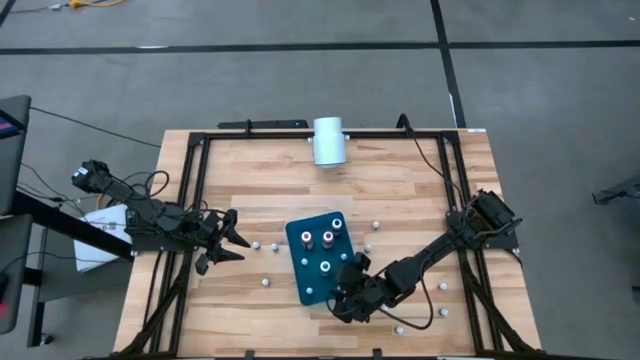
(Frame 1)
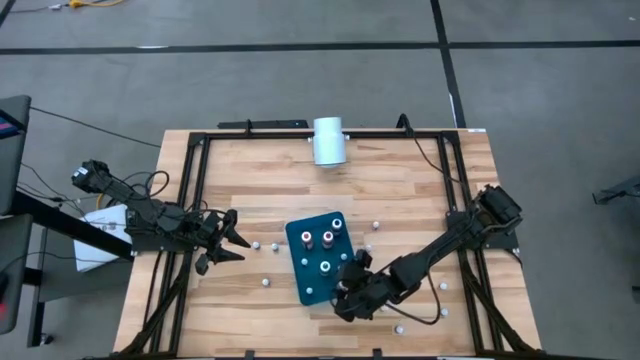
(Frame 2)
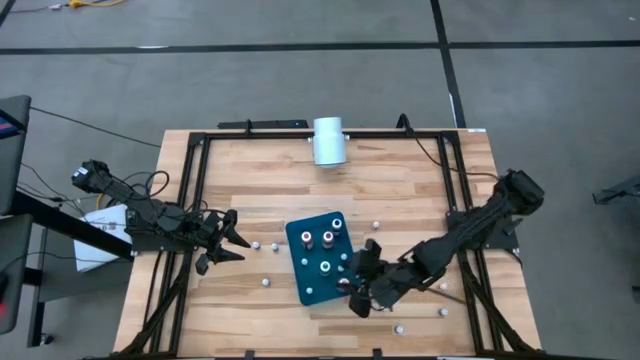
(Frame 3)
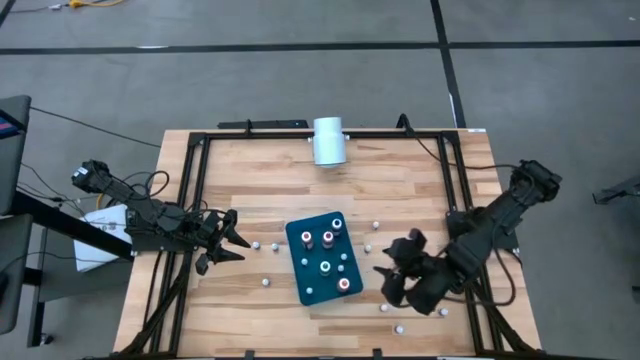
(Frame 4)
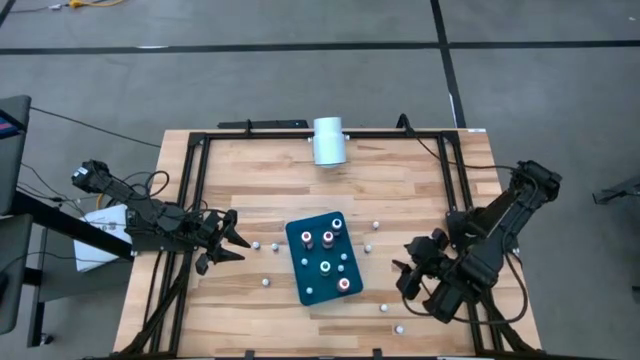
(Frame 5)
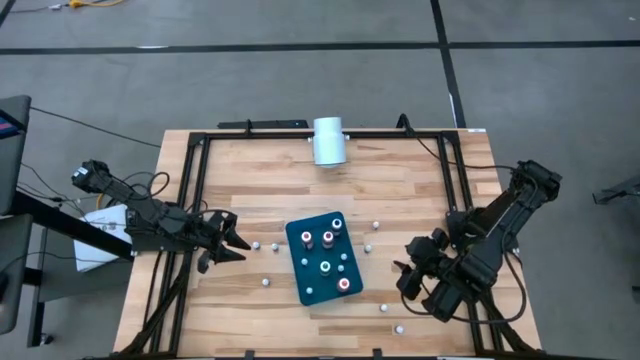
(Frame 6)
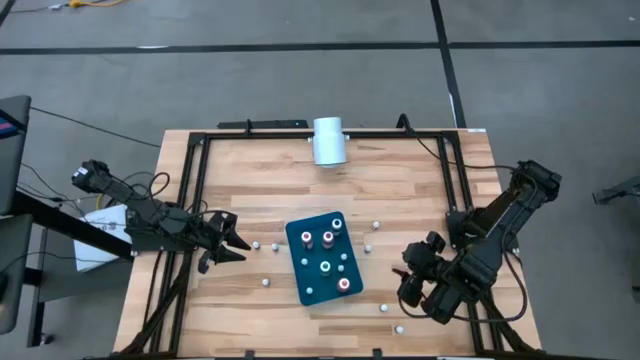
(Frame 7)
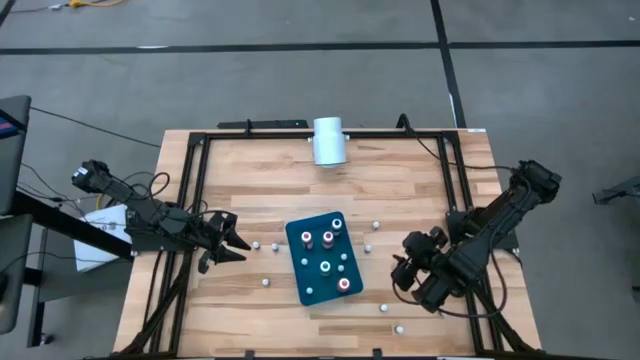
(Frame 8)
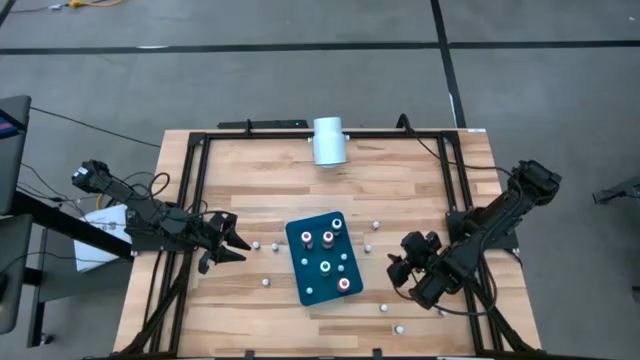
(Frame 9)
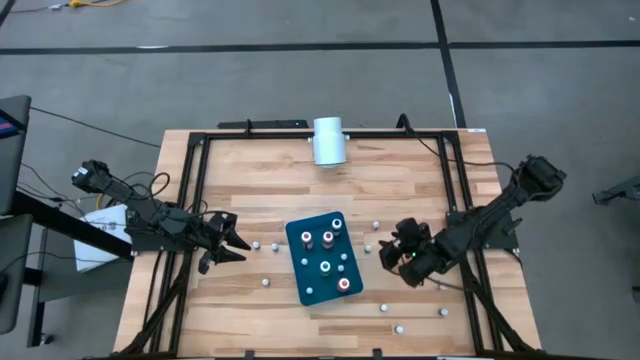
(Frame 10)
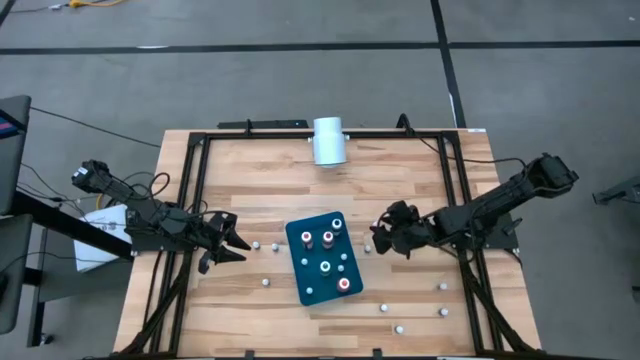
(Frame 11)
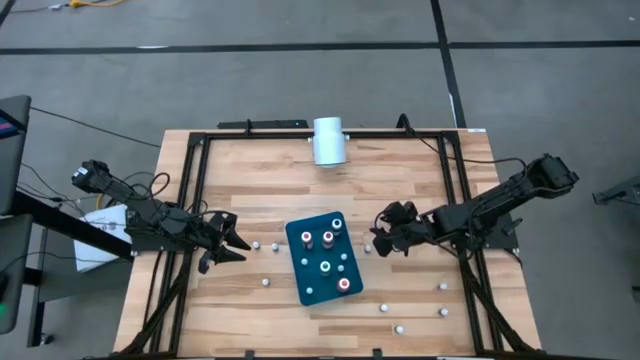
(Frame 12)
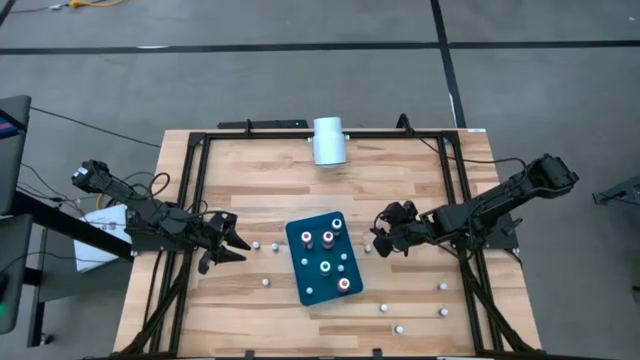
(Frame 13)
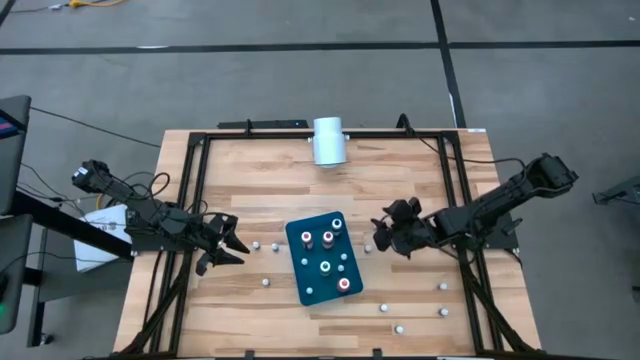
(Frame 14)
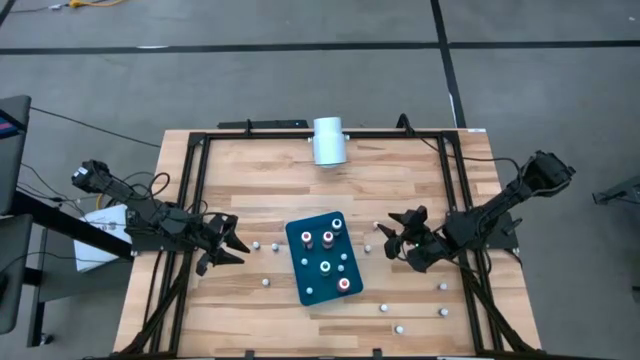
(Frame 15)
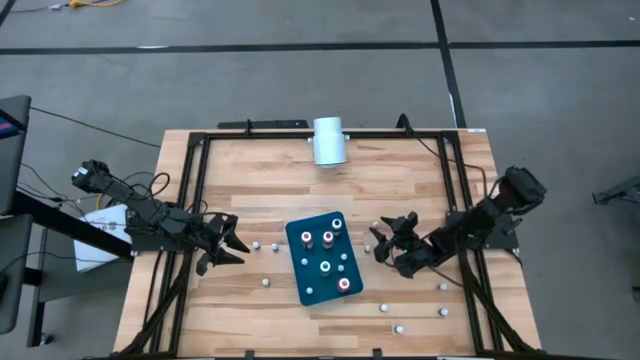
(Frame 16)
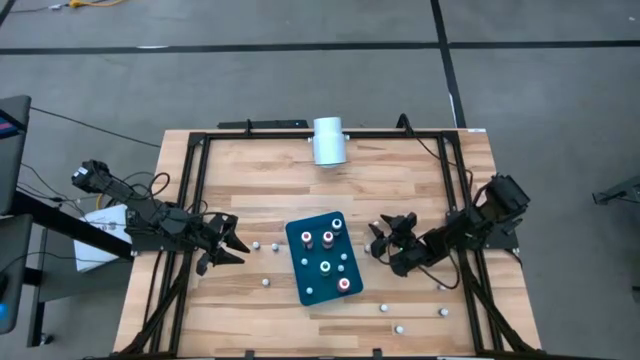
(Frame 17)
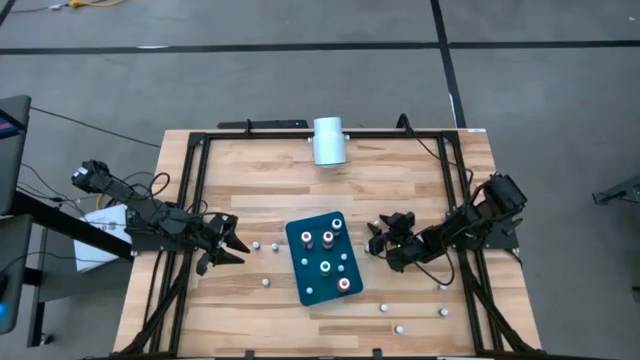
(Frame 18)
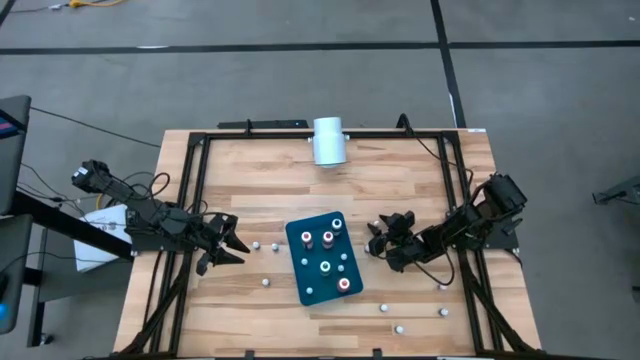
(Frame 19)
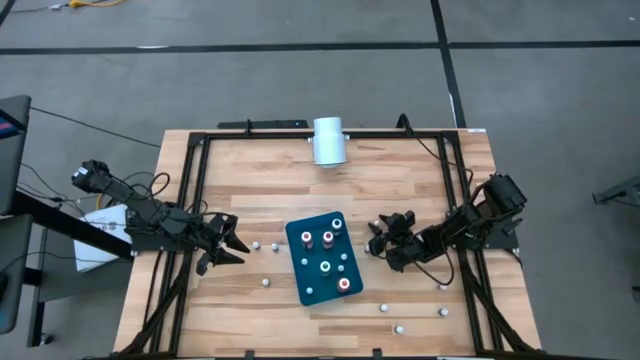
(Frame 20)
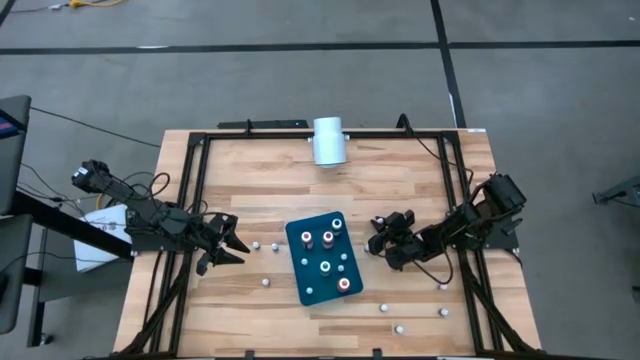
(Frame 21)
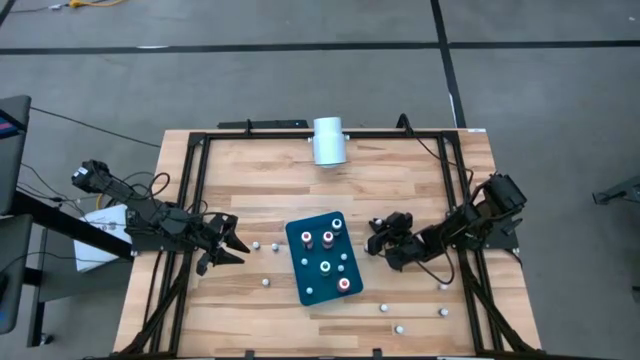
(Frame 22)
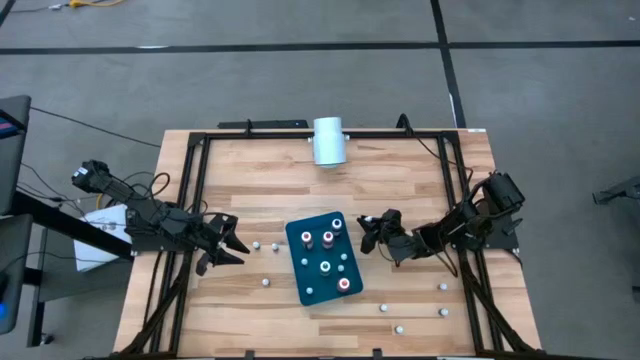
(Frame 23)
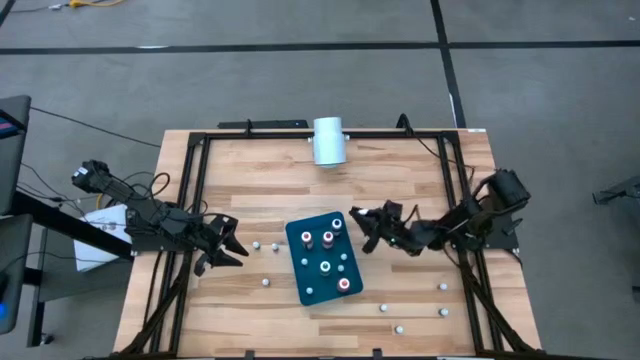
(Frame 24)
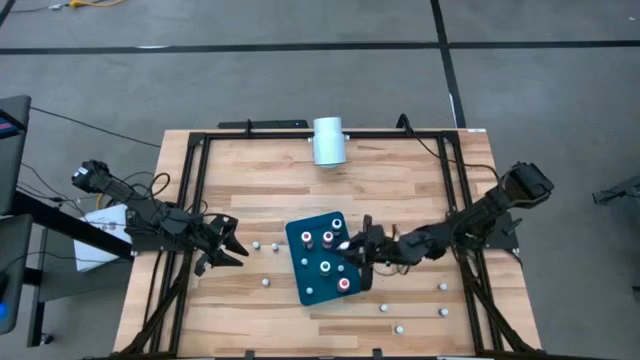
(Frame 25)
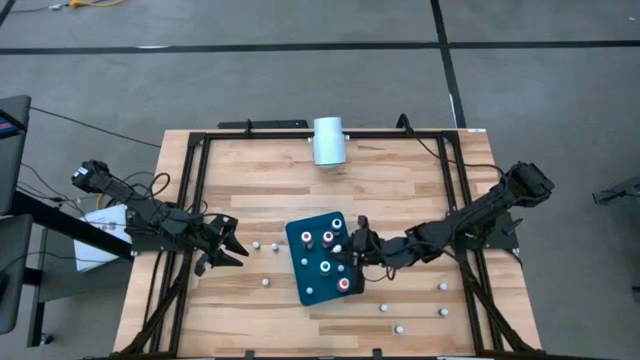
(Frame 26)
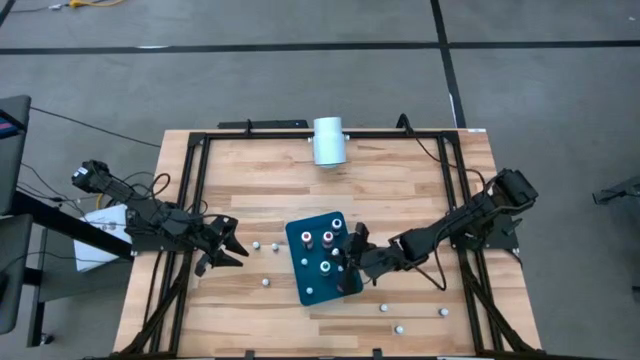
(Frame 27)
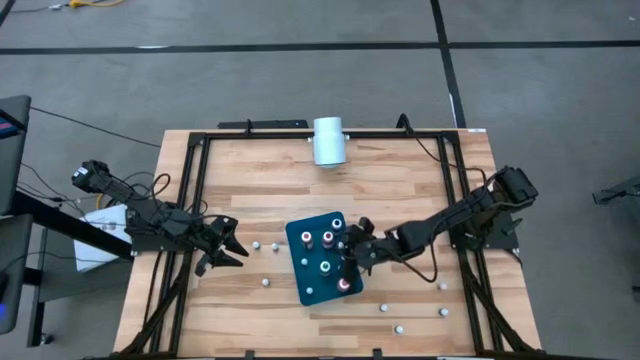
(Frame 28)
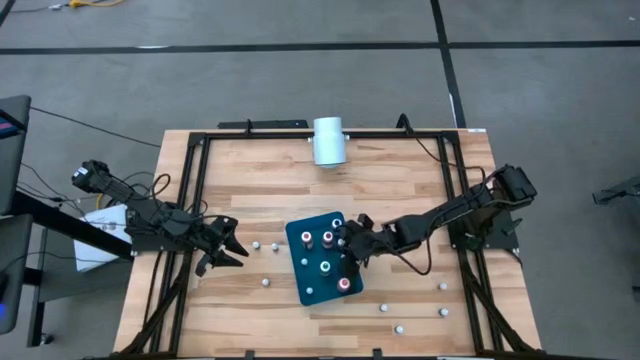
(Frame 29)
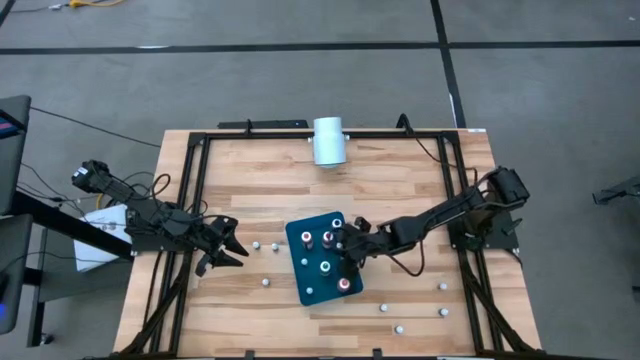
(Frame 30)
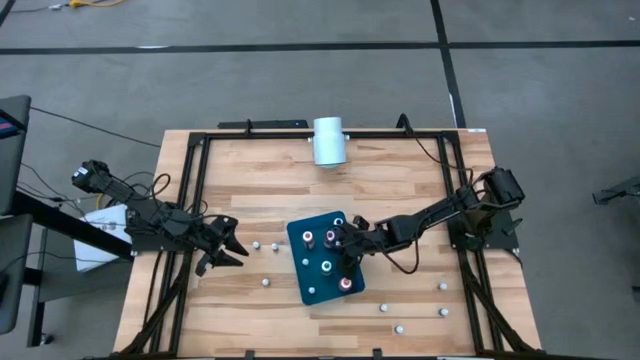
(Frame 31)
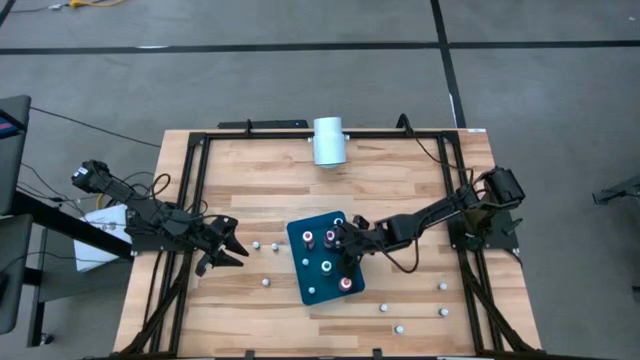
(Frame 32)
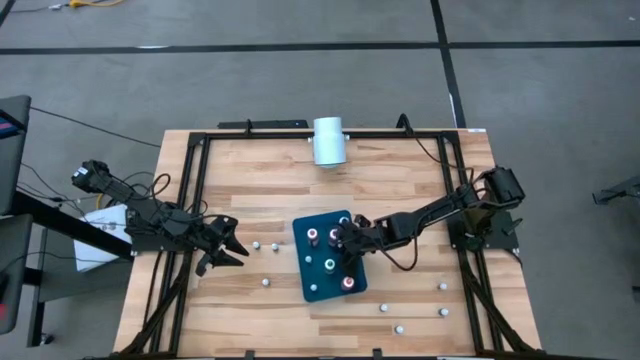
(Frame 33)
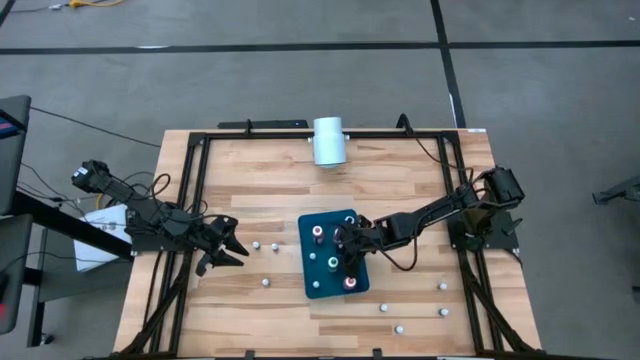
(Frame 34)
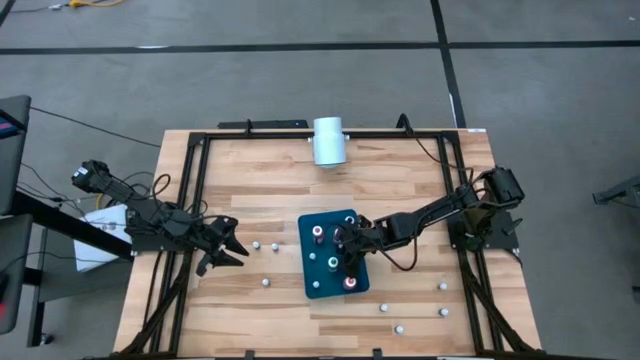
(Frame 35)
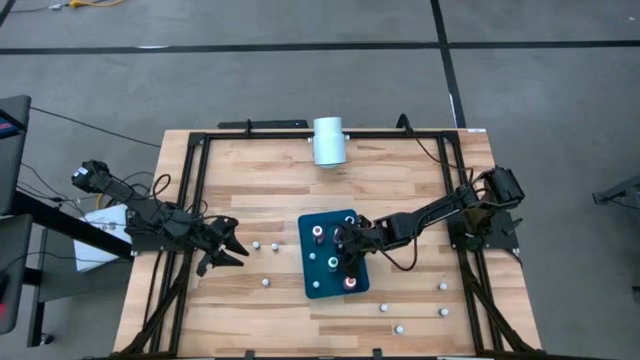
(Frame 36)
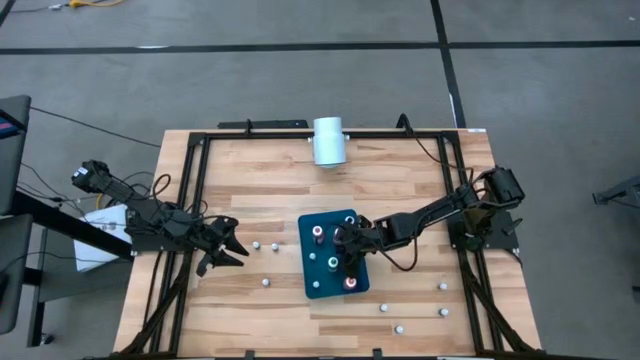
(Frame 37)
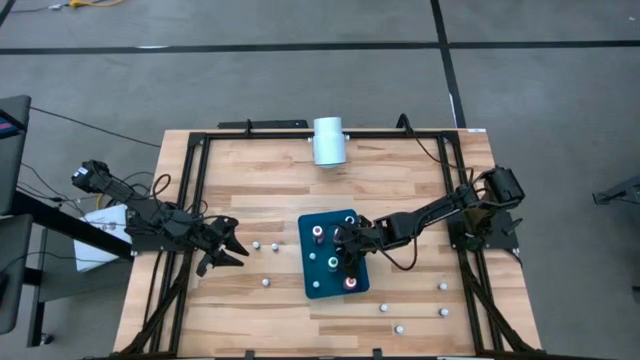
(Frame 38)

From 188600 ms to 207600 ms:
Task: Pick & Place food coloring
Put the small orange food coloring bottle into the blue bin

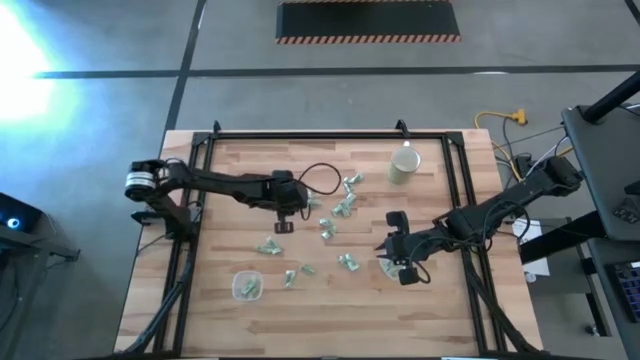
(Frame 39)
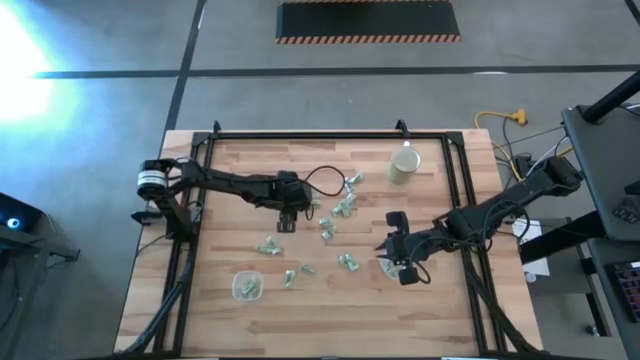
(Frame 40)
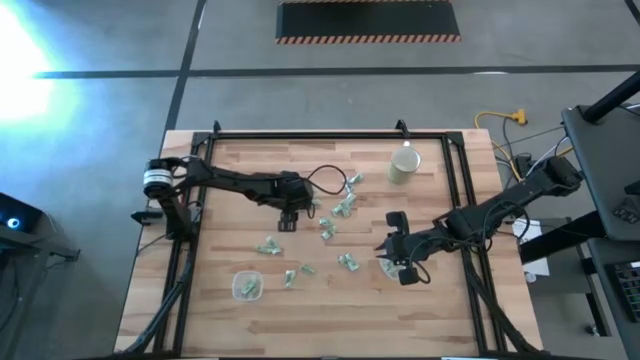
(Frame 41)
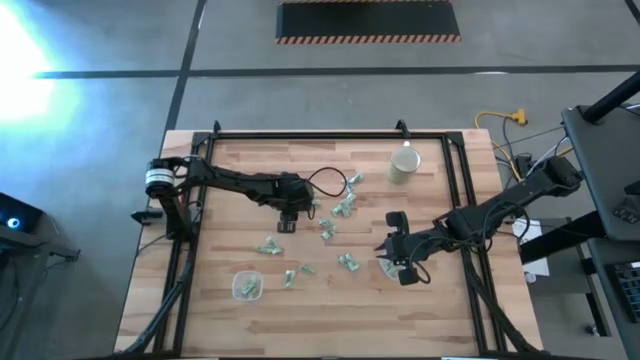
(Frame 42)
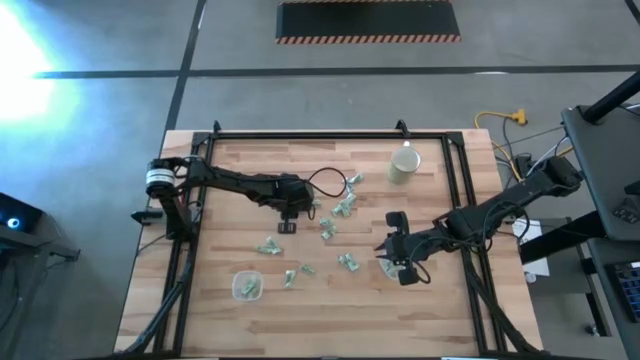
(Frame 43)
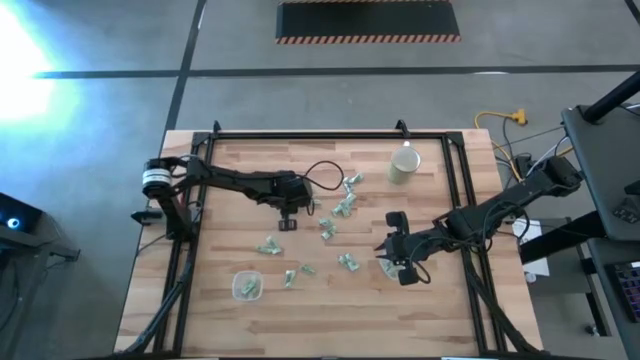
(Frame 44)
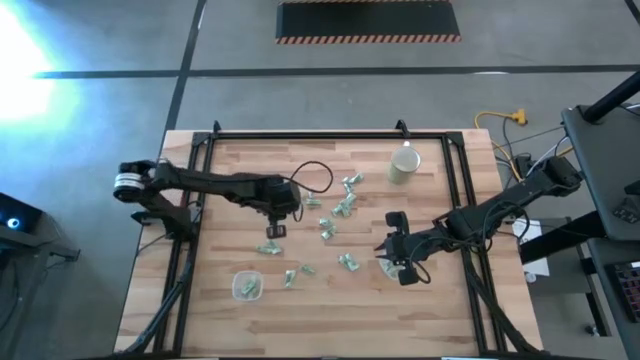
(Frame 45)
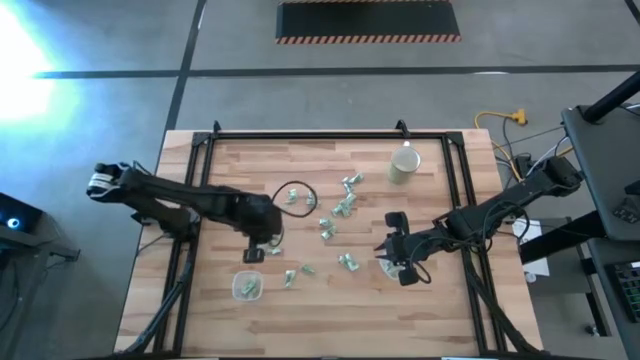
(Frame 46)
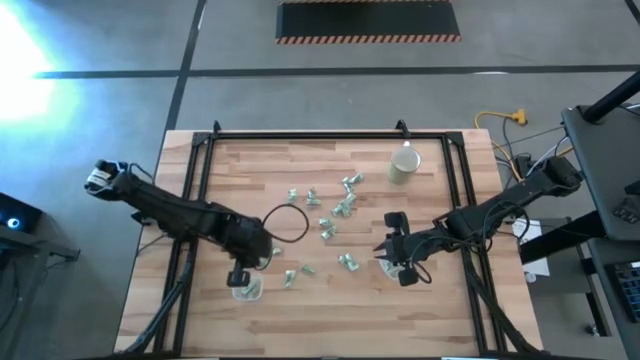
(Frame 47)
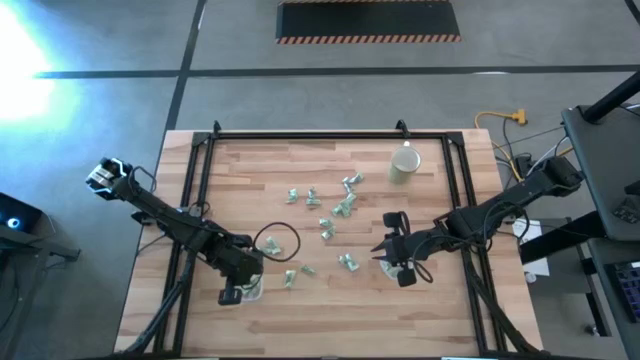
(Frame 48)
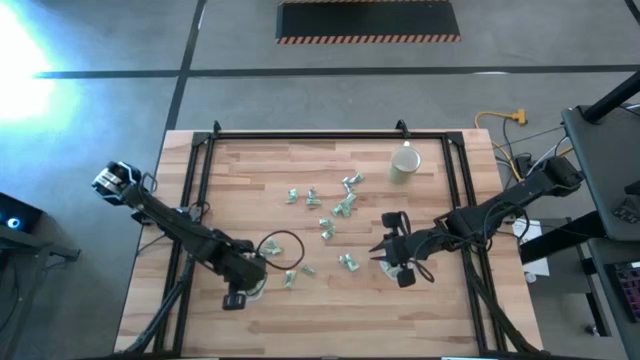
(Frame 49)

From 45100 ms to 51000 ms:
Task: Pick and place Stevia / Truvia into bins
Put the stevia packet into the left transparent container
